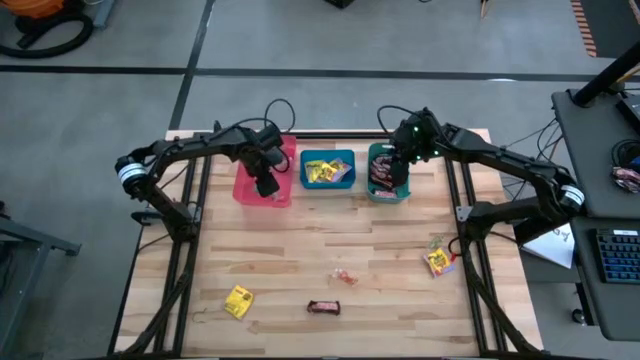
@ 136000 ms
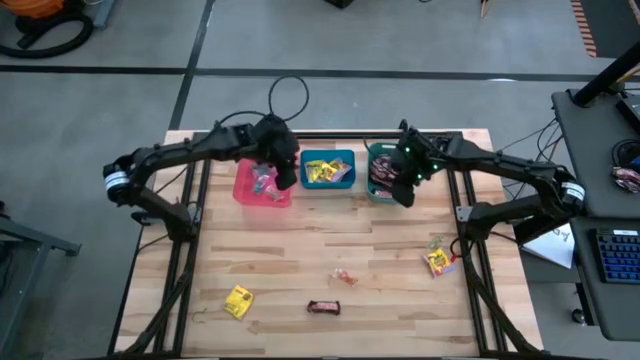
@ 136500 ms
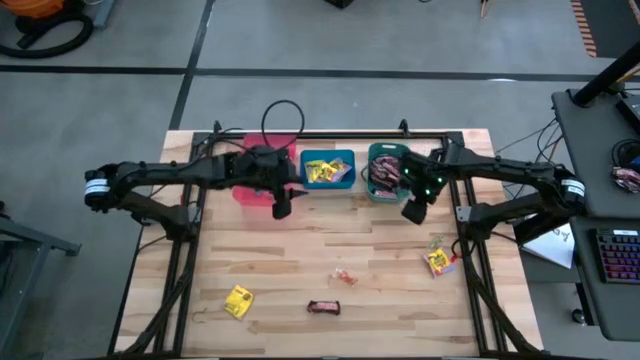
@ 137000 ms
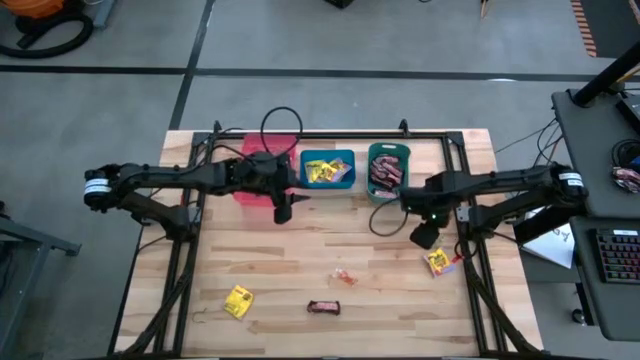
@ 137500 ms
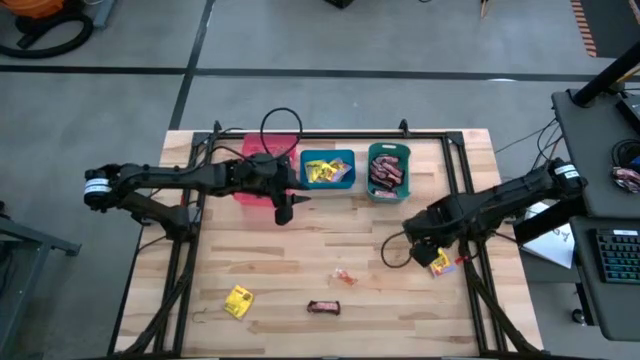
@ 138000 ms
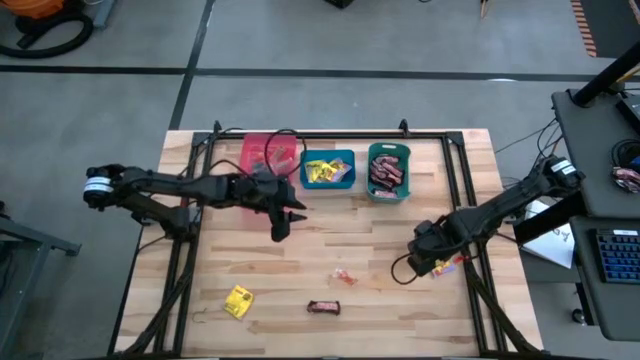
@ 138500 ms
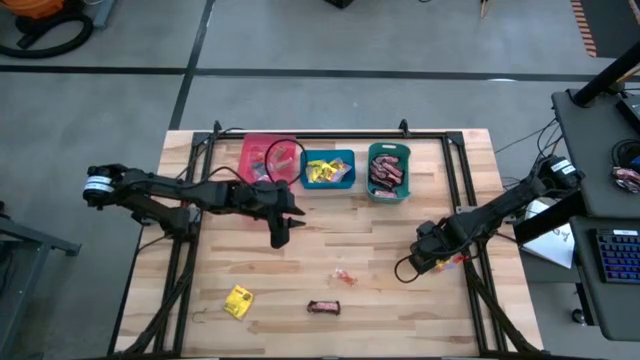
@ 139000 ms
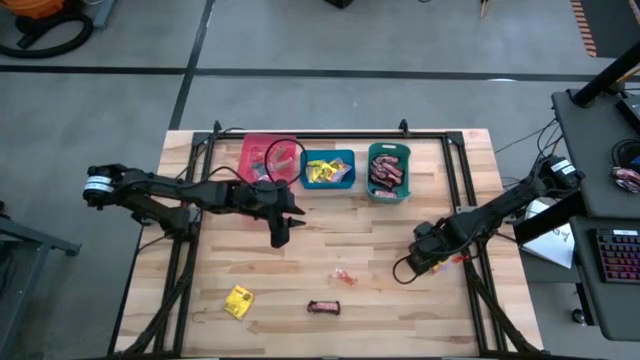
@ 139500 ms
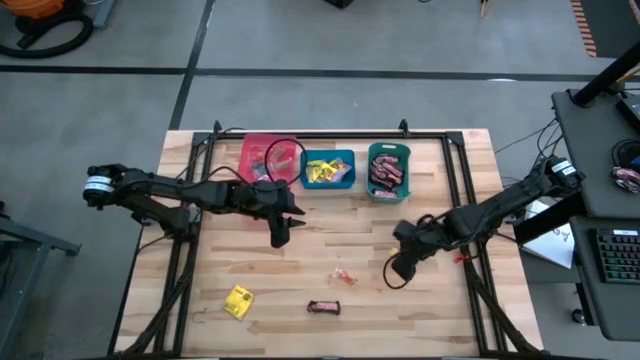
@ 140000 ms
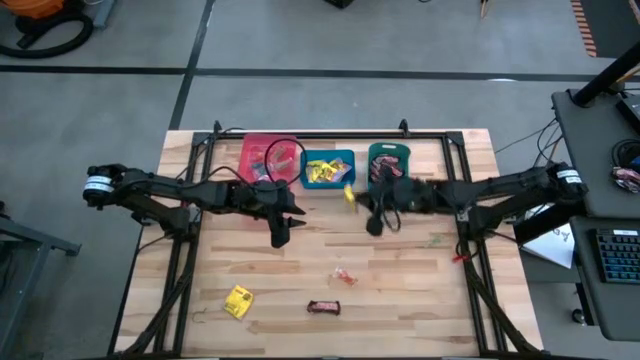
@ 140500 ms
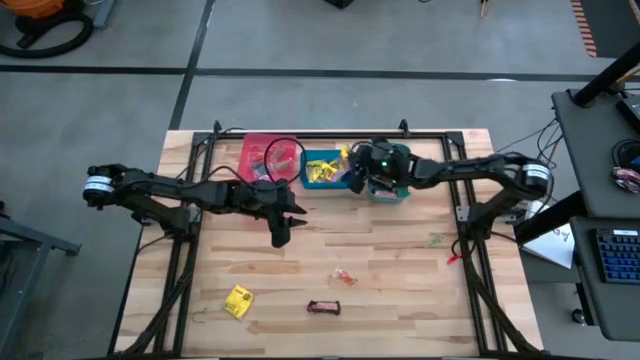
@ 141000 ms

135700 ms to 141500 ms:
Task: Sort candy
Put the right yellow candy into the blue bin

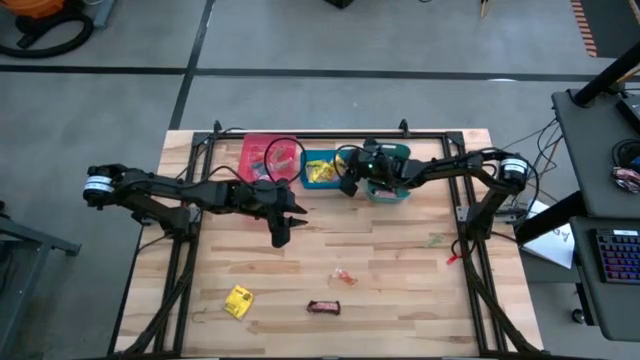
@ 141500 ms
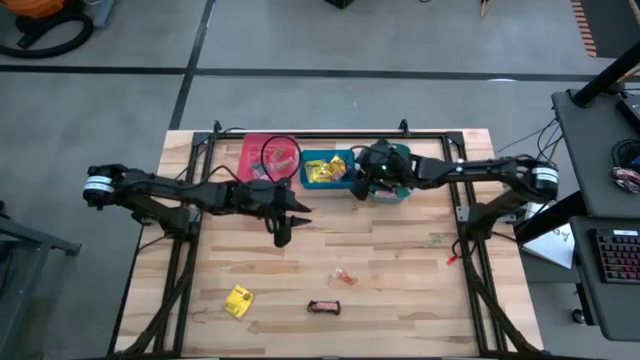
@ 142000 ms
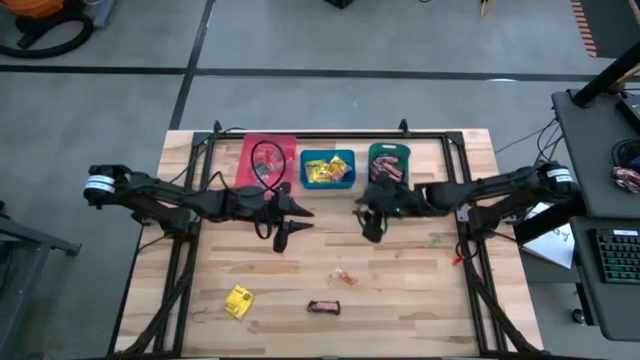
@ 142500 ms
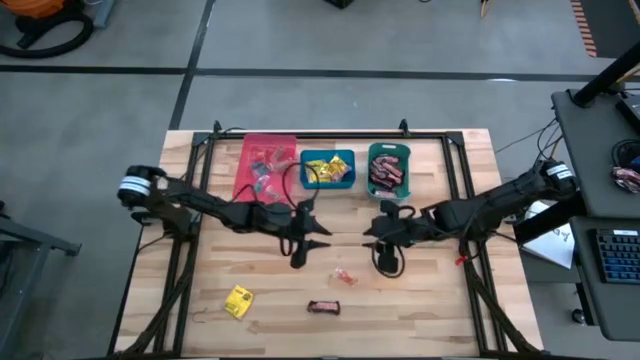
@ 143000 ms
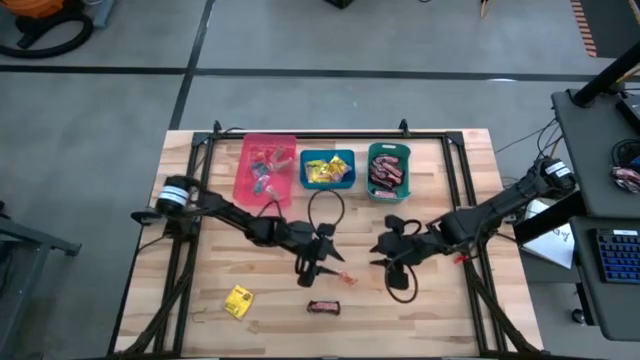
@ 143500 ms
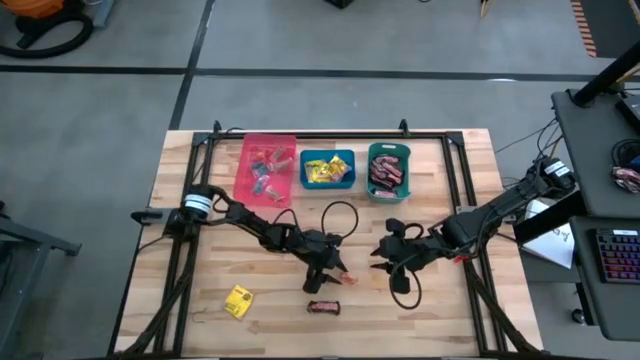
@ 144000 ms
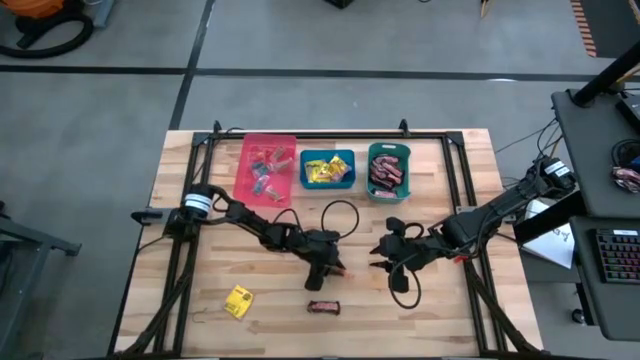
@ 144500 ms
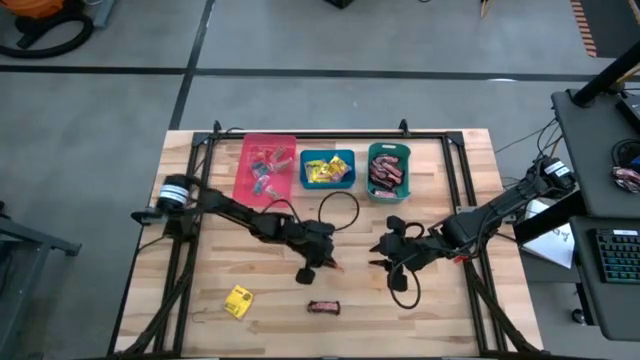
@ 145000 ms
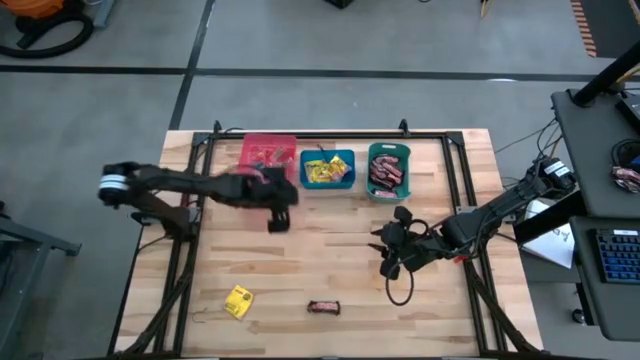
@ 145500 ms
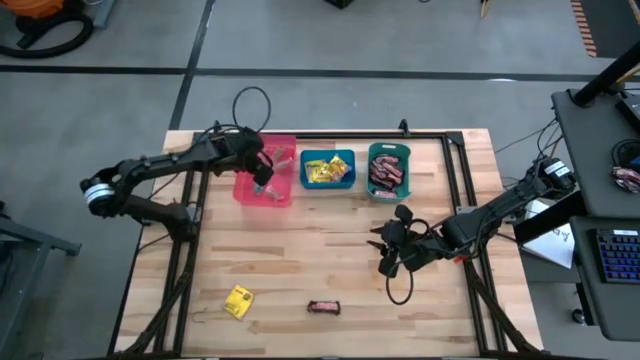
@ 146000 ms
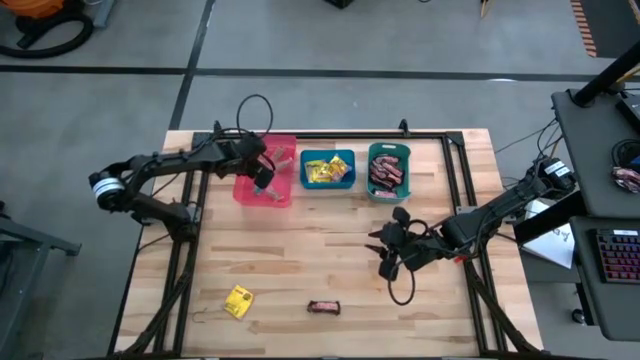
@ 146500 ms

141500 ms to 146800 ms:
Put the left orange candy into the red bin

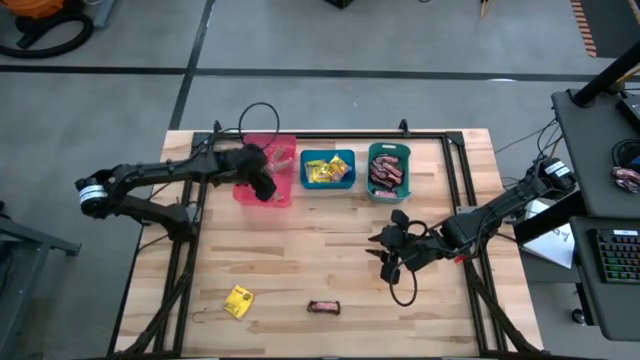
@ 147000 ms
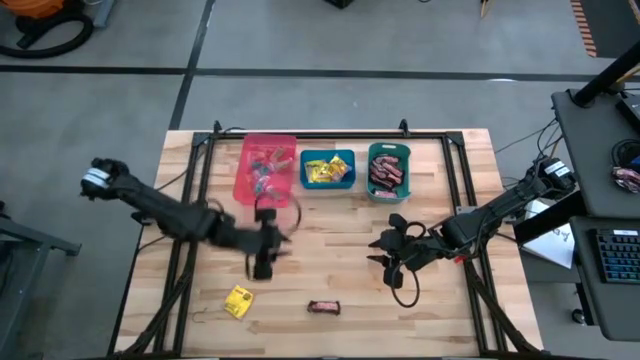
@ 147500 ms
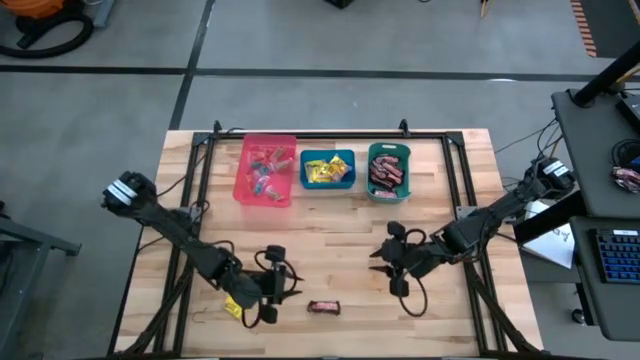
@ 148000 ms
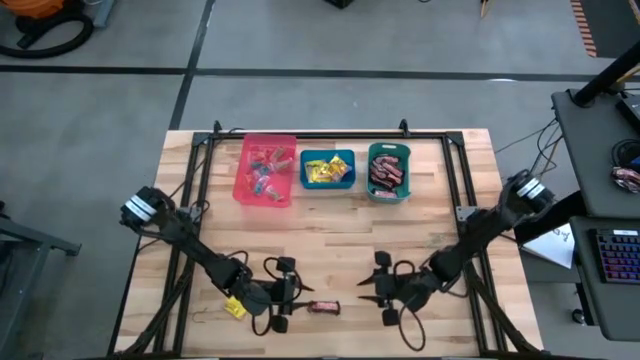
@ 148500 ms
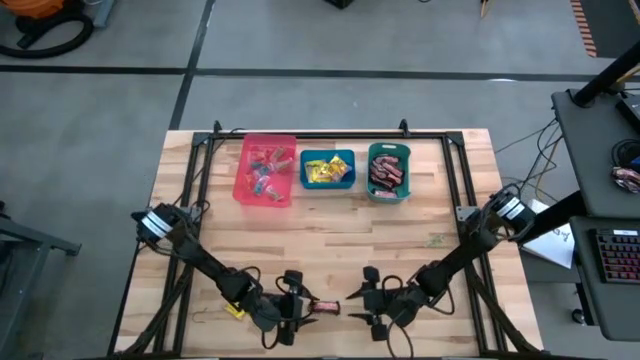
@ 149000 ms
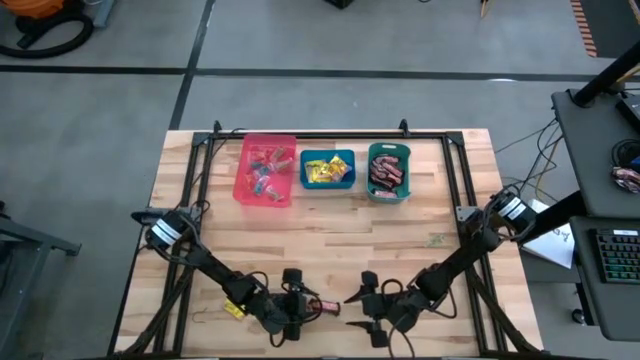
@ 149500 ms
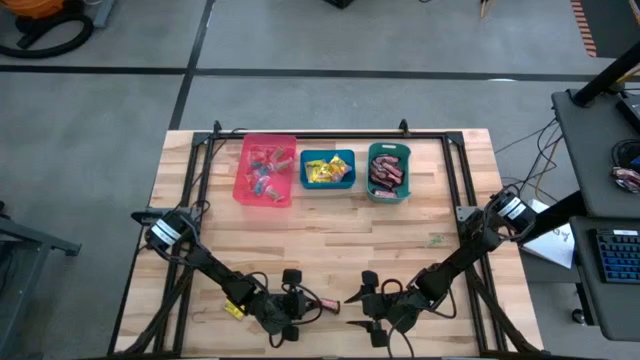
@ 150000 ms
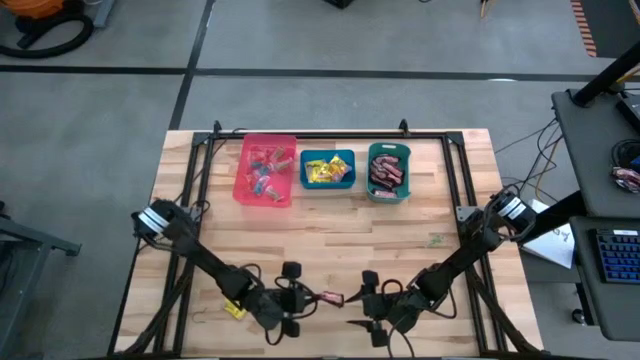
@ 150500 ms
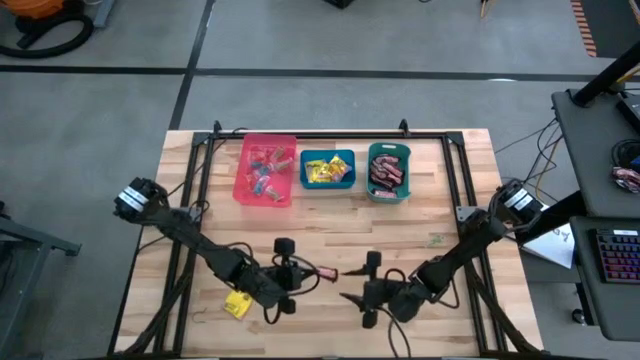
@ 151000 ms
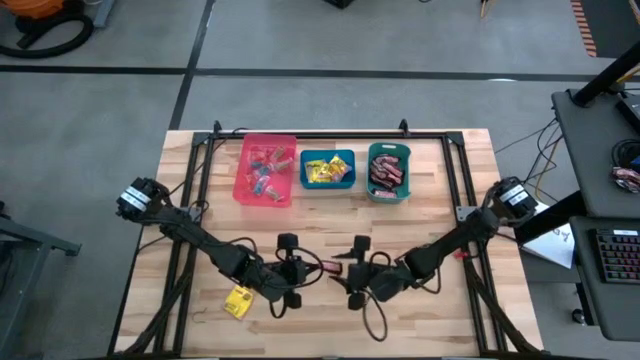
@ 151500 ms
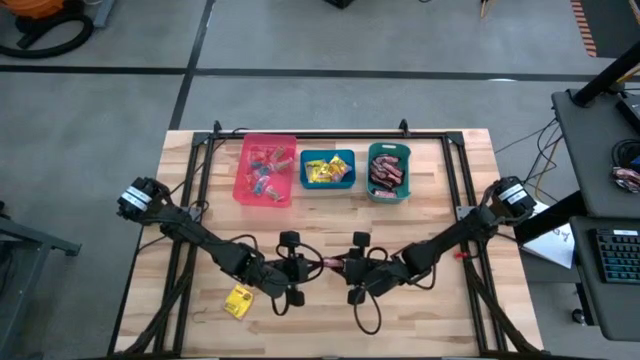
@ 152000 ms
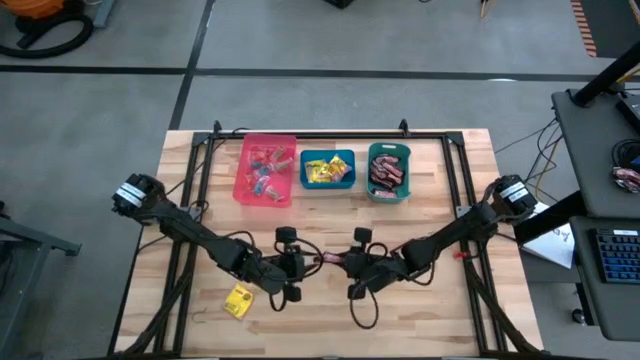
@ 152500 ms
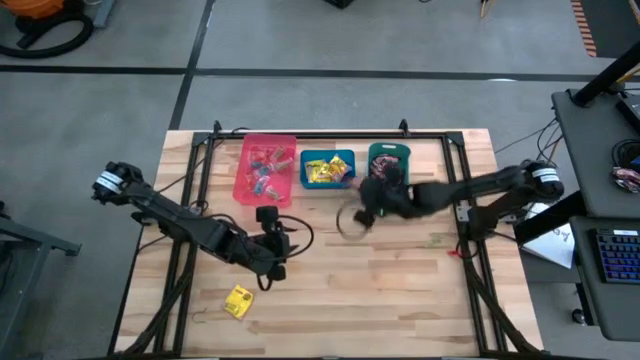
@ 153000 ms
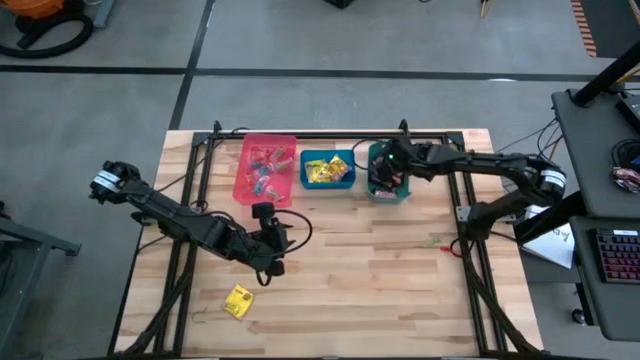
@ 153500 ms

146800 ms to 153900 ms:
Put the brown candy bar into the green bin

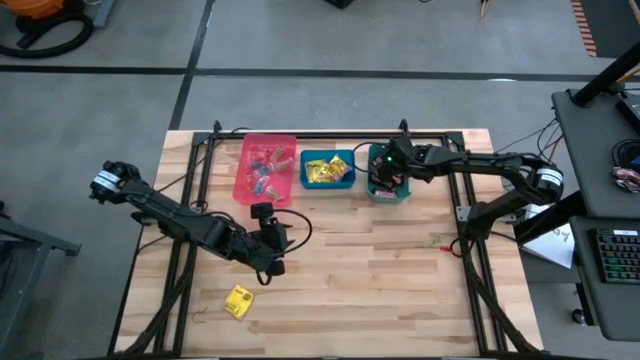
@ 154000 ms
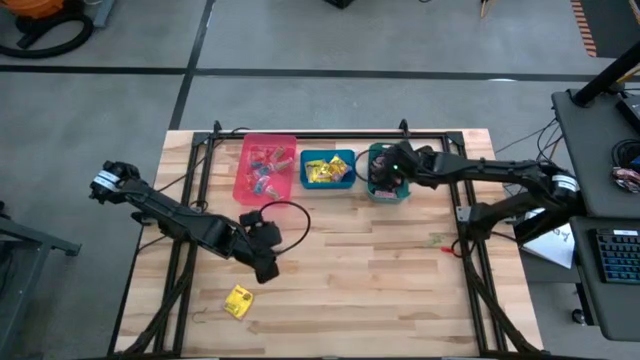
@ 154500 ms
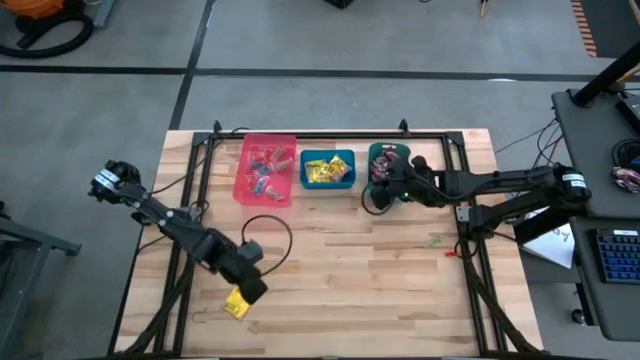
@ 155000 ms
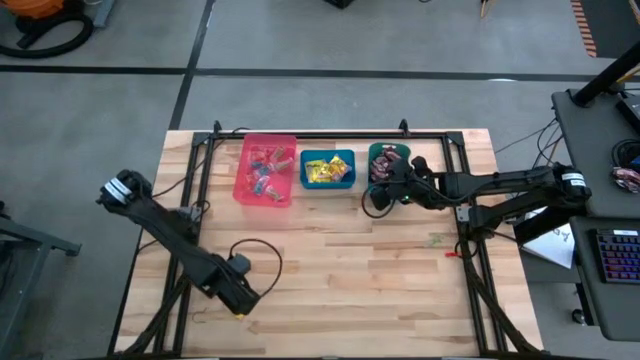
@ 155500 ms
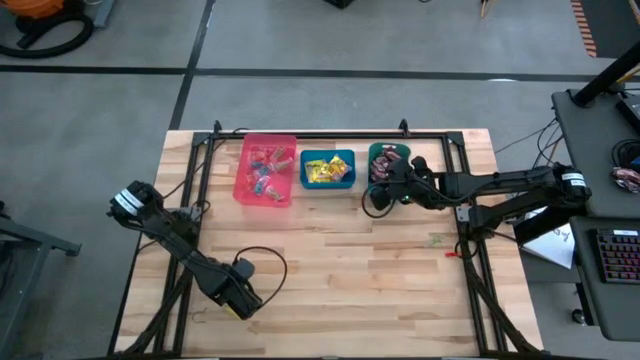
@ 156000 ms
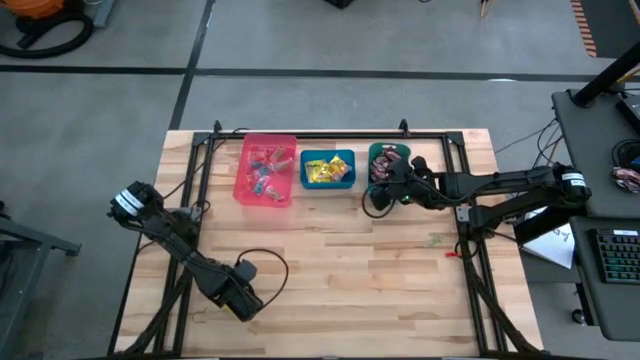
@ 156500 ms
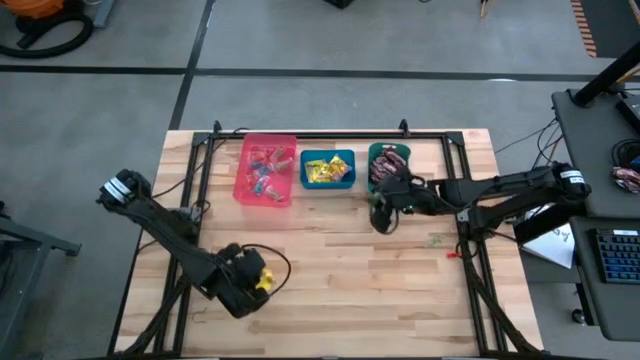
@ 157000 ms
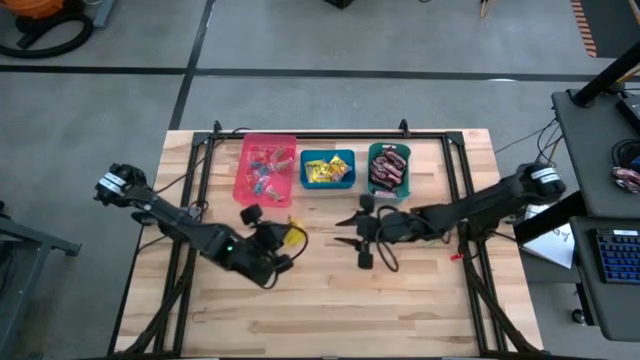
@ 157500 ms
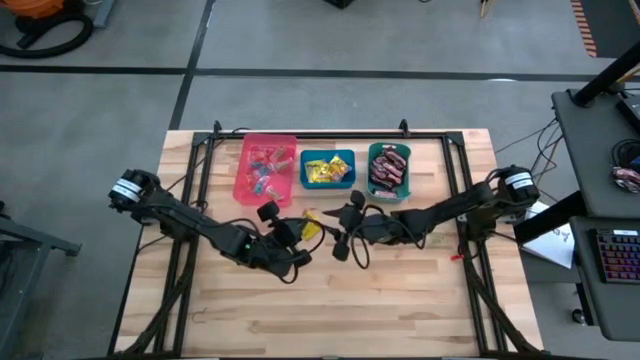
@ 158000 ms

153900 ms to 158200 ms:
Put the yellow candy into the blue bin
